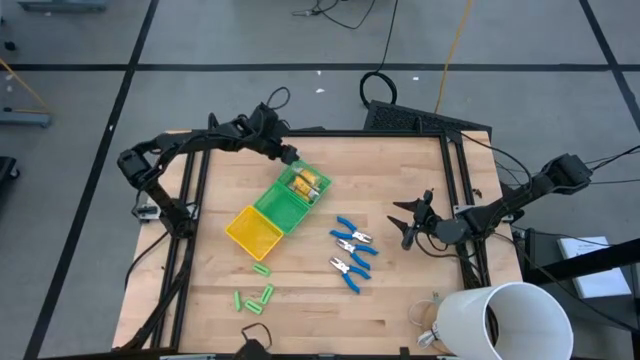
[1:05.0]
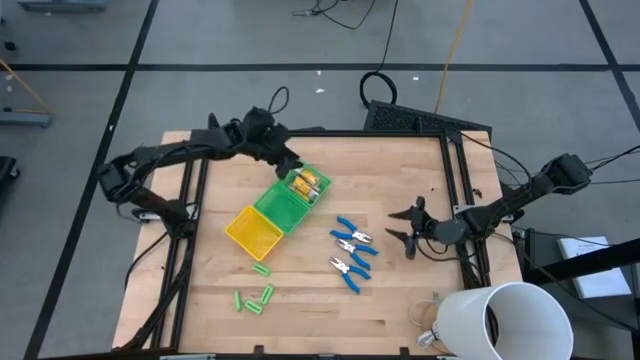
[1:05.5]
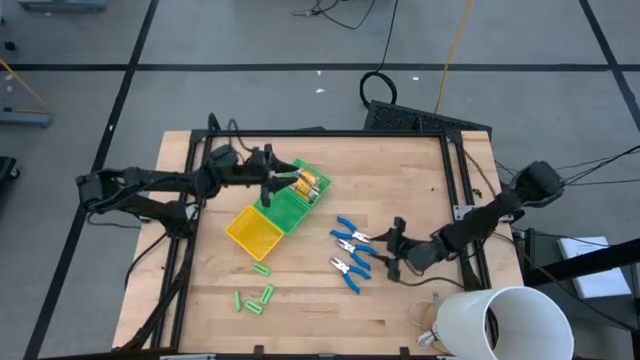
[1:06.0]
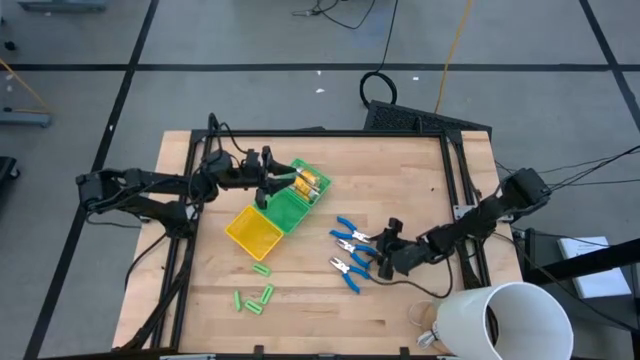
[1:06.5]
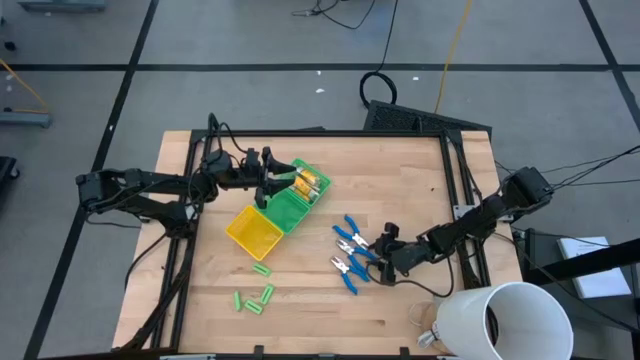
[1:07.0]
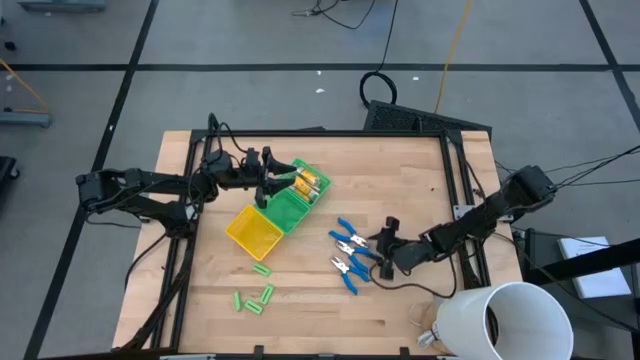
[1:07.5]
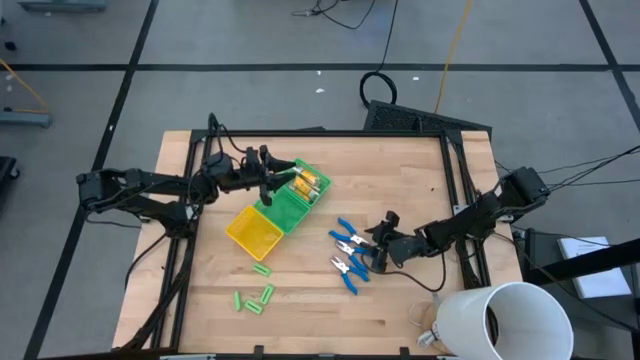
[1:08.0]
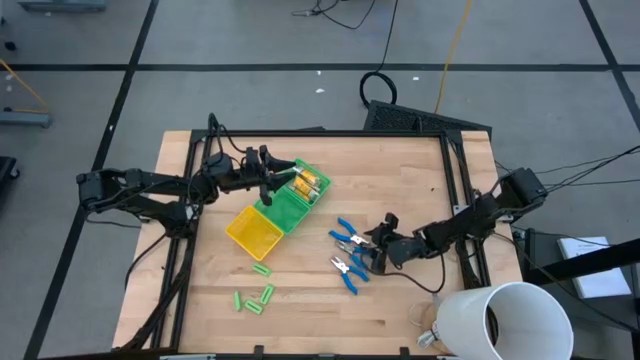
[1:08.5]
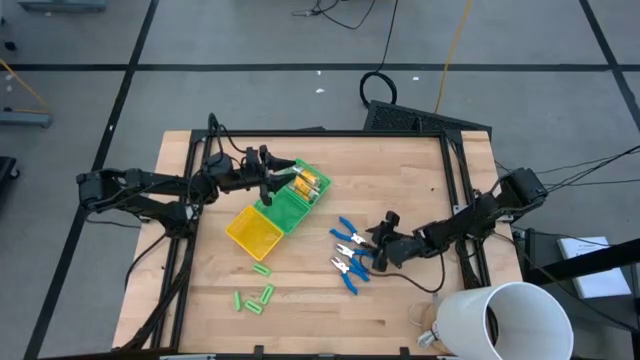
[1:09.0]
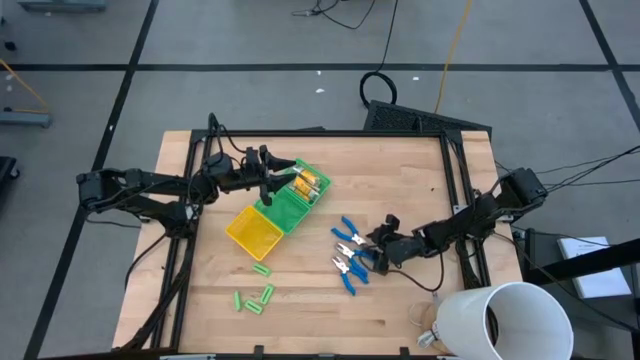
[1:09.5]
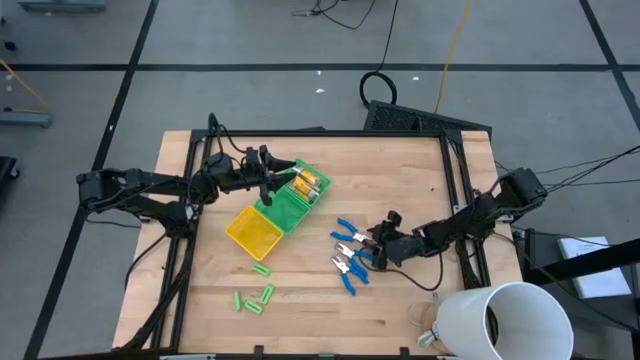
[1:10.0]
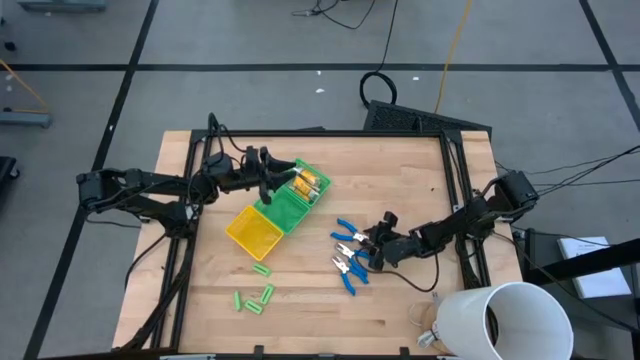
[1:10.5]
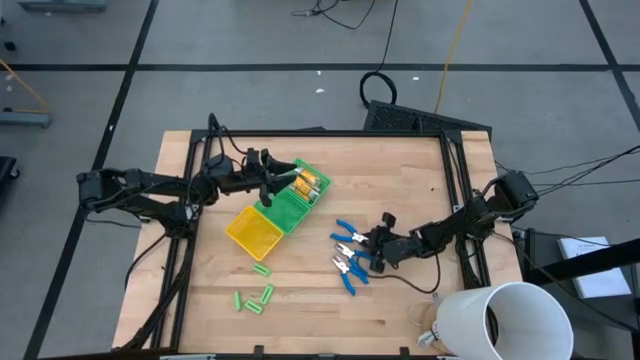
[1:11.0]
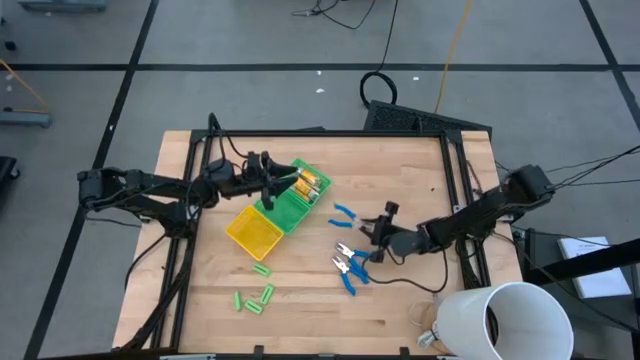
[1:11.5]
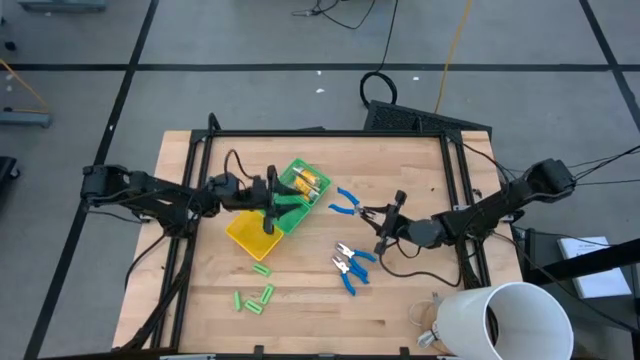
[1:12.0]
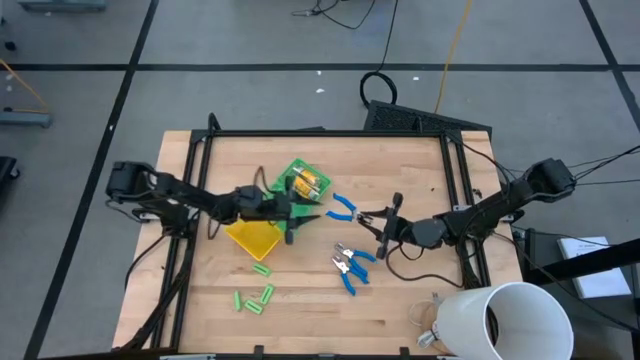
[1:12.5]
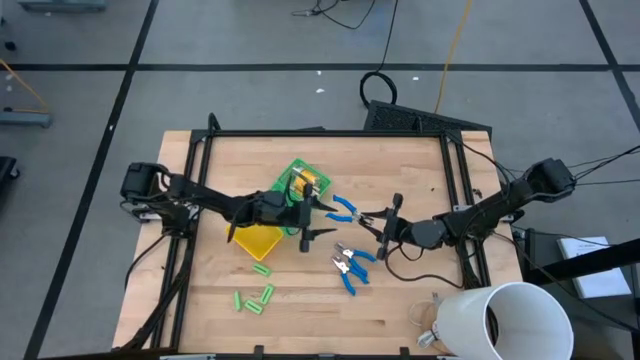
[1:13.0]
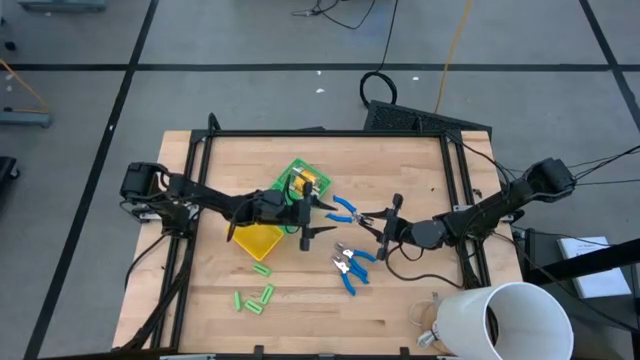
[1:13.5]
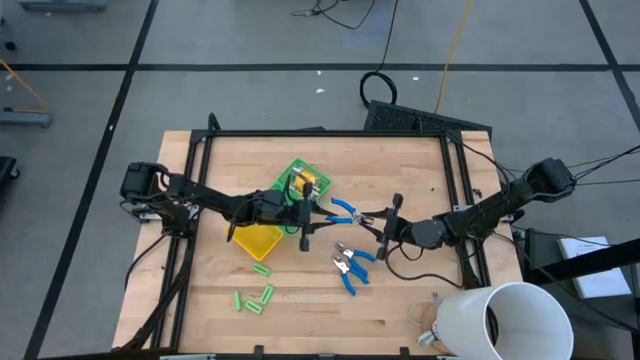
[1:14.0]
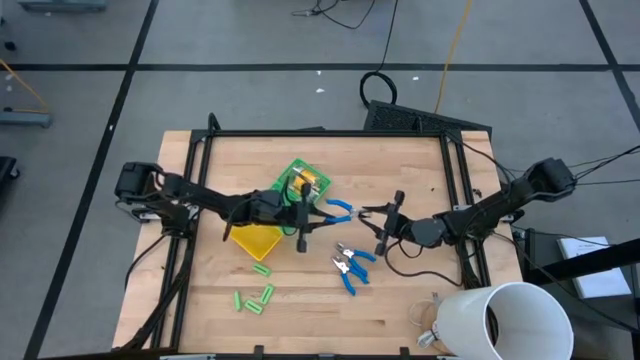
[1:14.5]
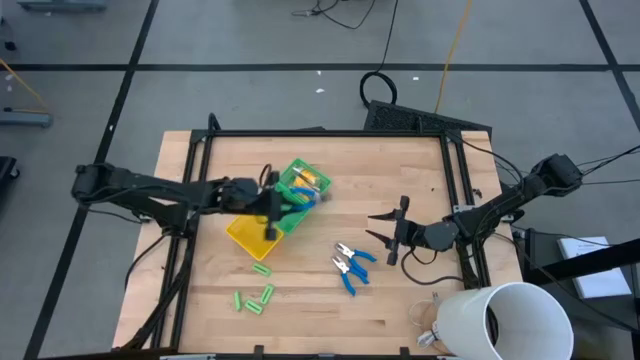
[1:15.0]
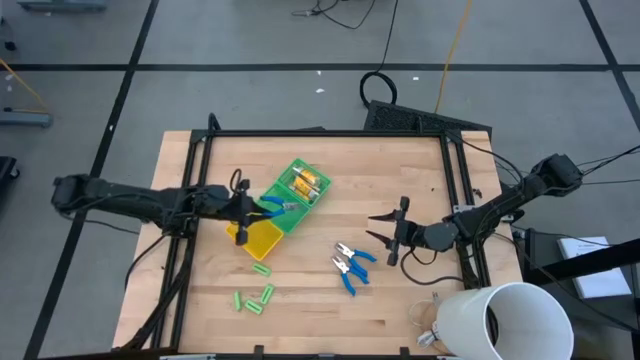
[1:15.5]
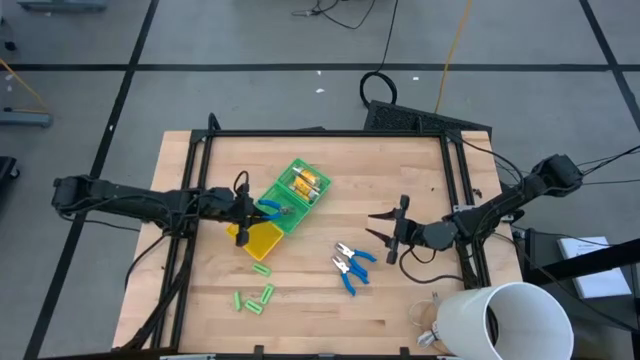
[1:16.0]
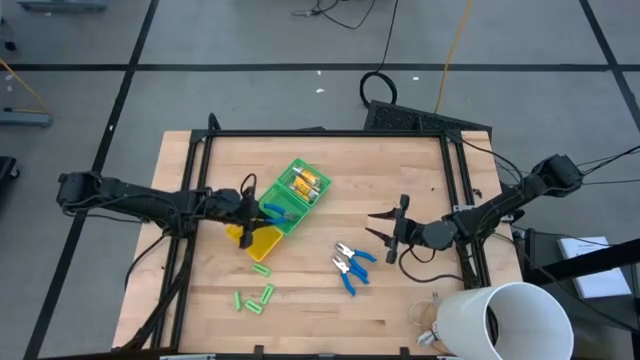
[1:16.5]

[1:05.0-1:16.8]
Task: Pick & Place School Supplies
Put the top blue hole puncher into the bottom green bin

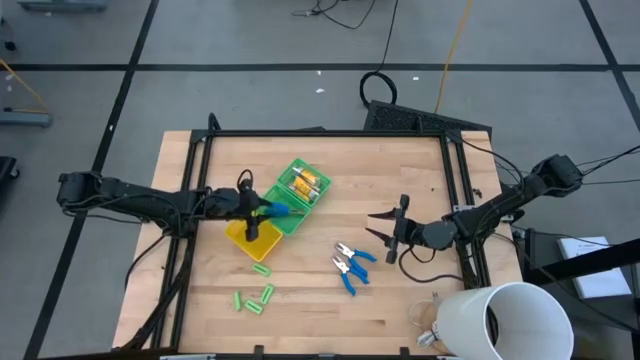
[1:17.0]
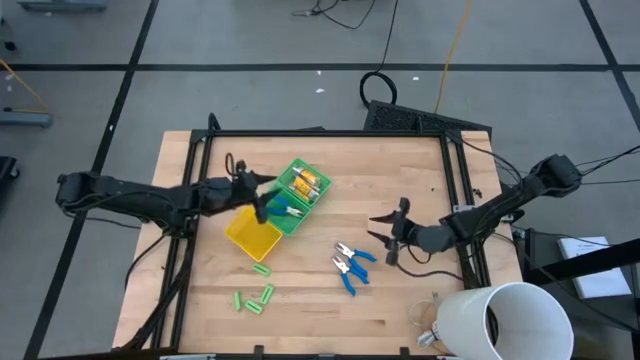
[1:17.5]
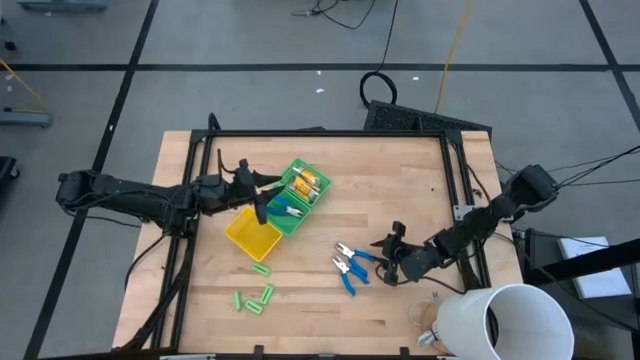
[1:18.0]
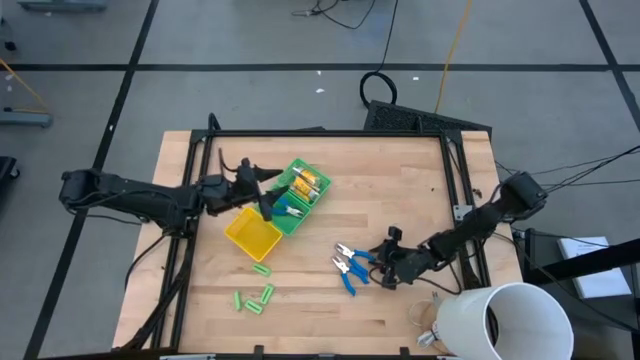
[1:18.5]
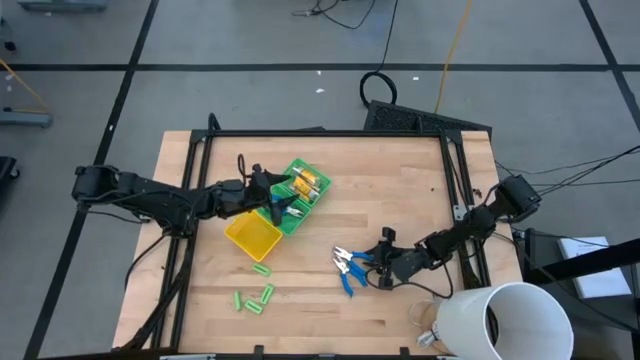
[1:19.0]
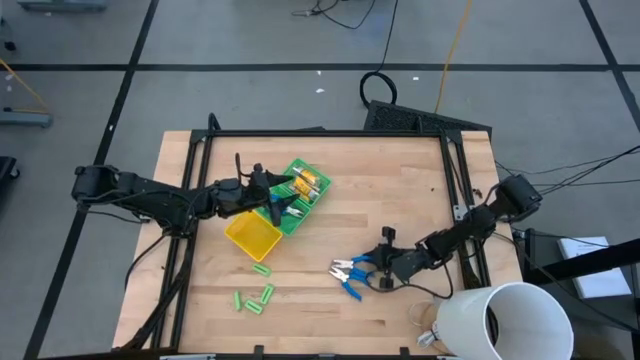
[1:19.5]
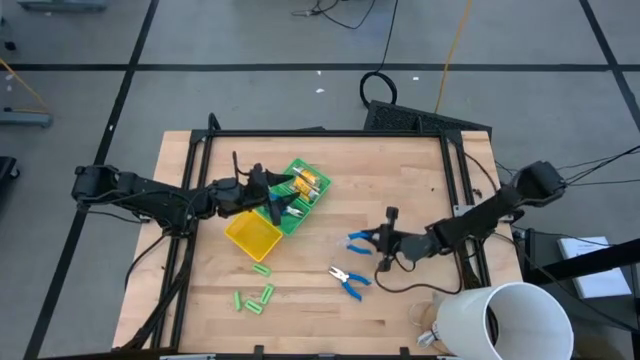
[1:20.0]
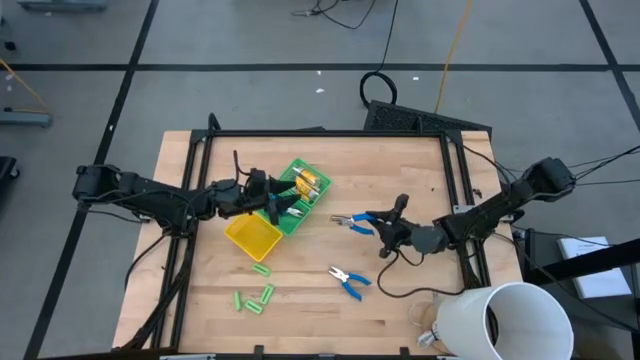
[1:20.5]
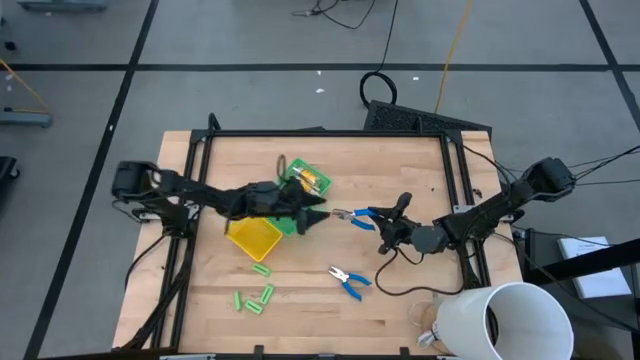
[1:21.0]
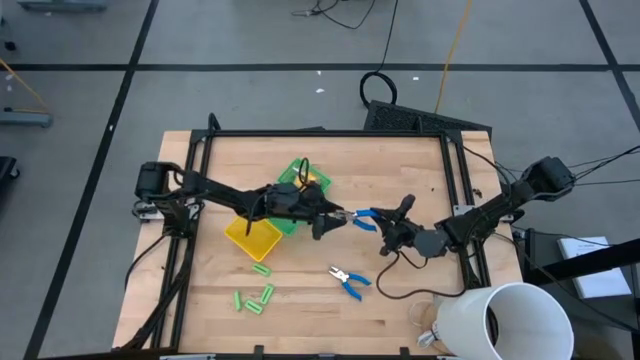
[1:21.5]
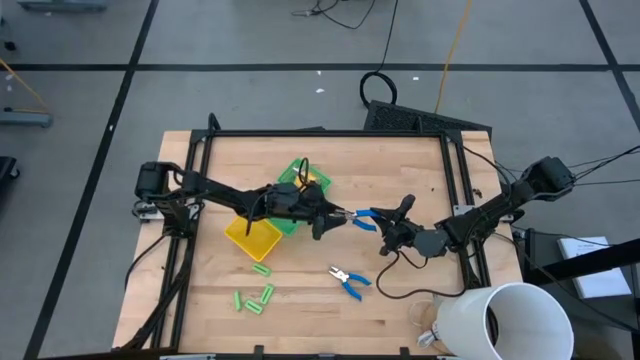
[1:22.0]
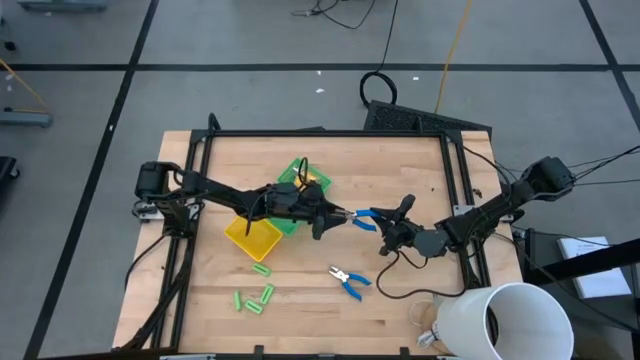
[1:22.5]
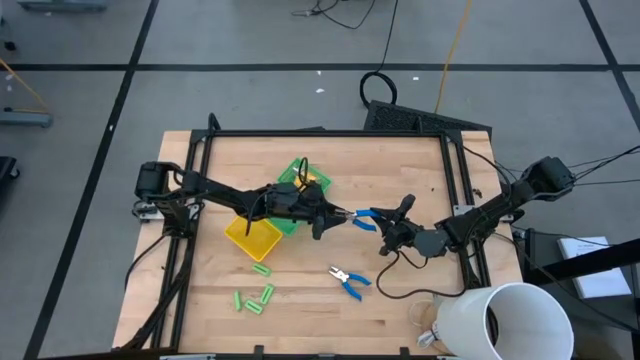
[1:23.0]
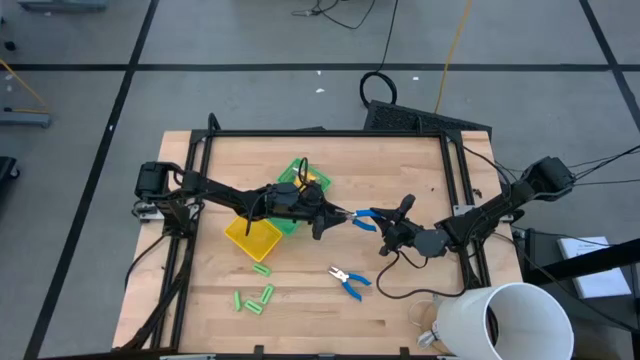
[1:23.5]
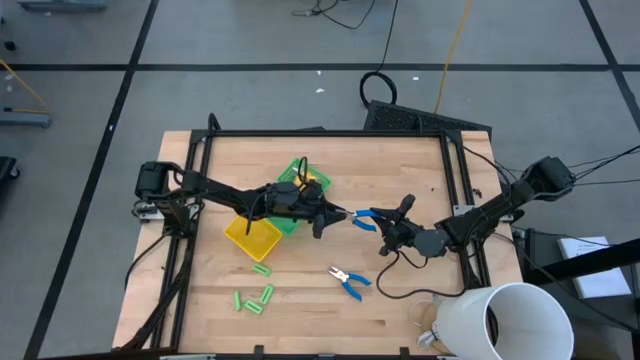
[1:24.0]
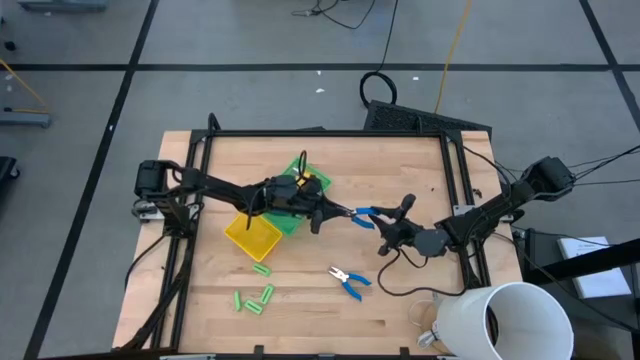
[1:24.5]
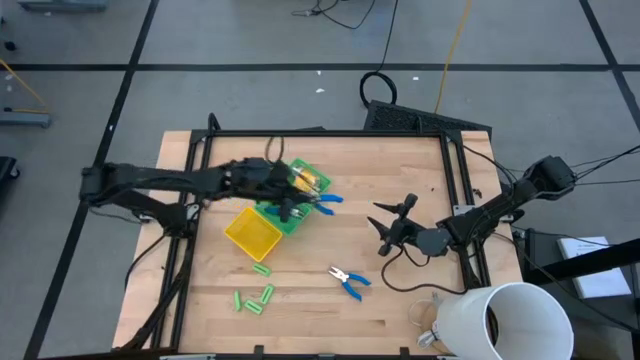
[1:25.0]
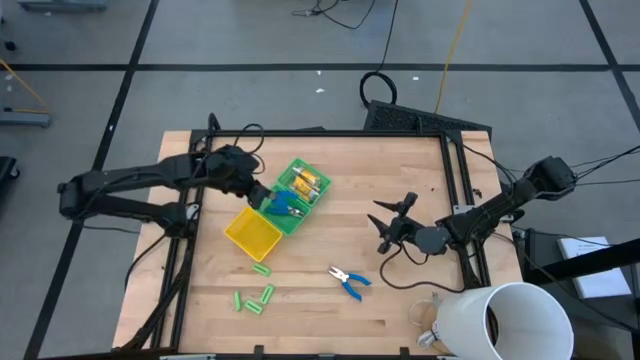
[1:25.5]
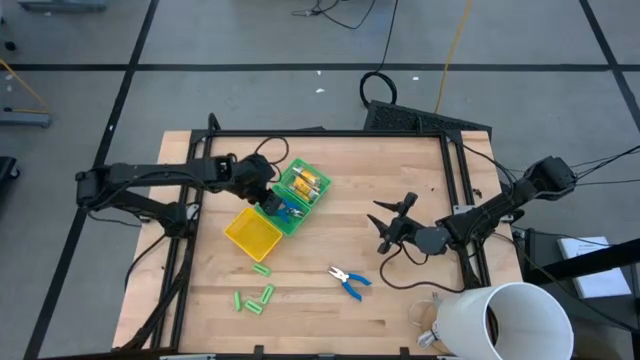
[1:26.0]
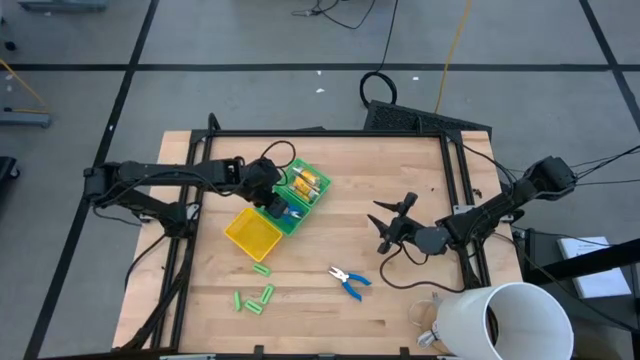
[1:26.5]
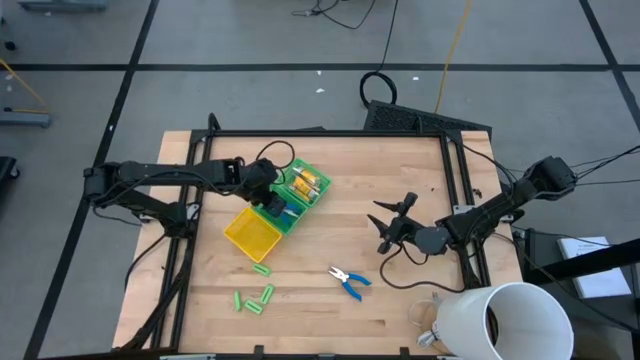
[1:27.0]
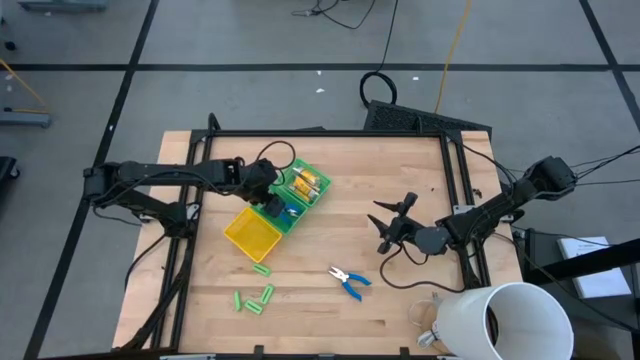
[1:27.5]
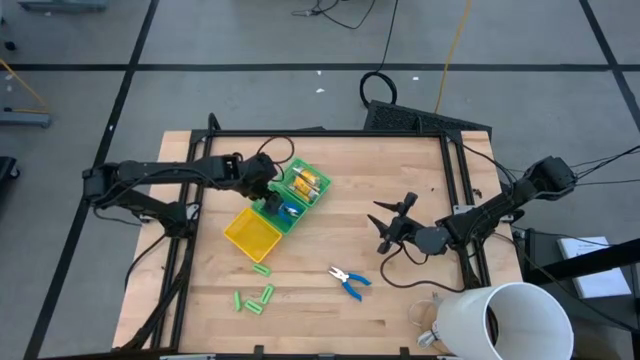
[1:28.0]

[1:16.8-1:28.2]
Put the top blue hole puncher into the bottom green bin
